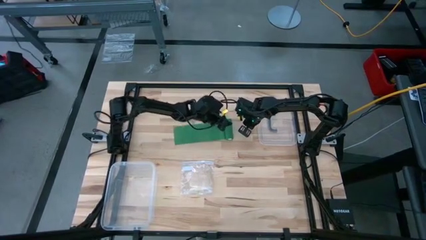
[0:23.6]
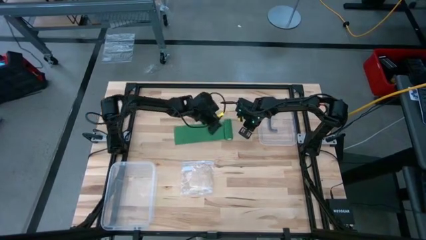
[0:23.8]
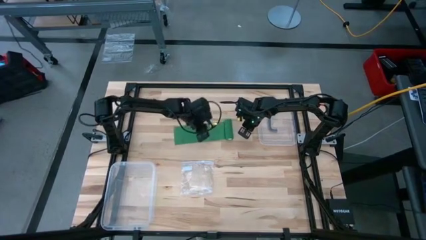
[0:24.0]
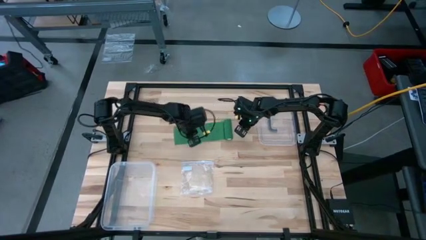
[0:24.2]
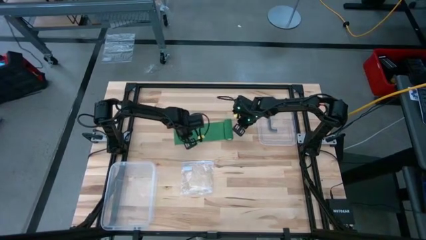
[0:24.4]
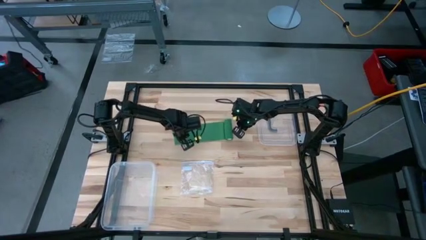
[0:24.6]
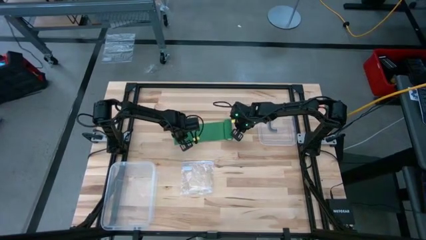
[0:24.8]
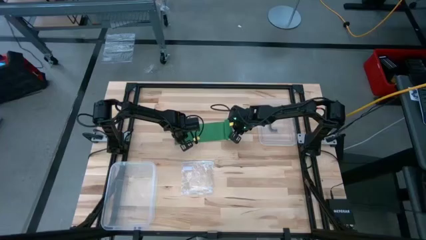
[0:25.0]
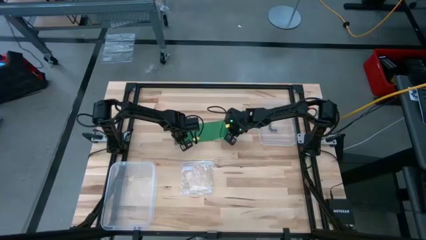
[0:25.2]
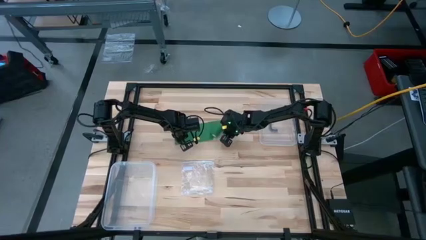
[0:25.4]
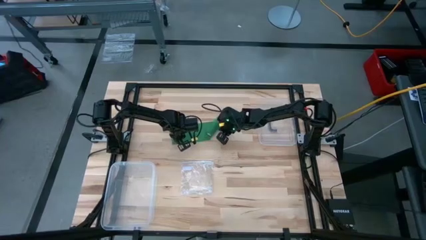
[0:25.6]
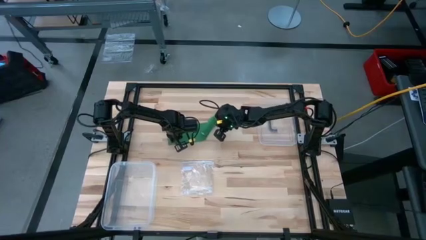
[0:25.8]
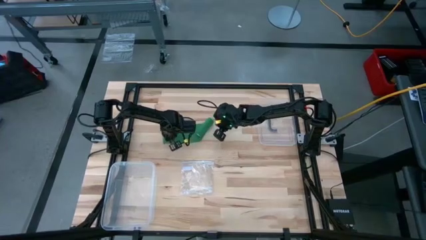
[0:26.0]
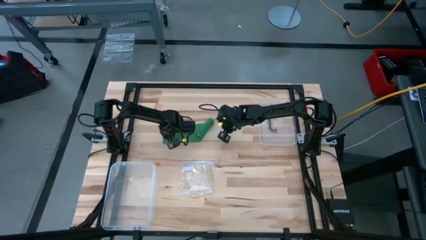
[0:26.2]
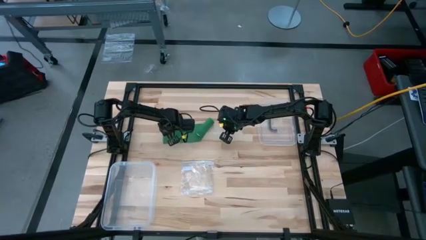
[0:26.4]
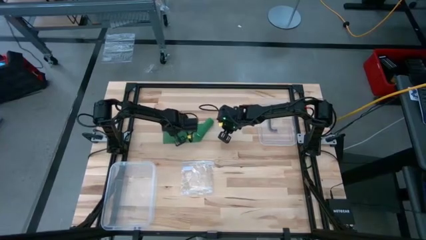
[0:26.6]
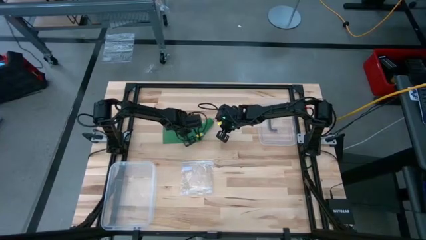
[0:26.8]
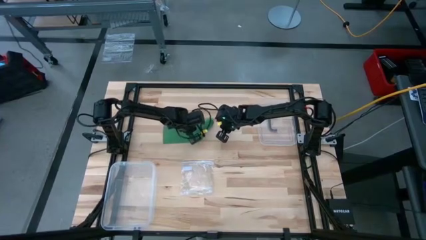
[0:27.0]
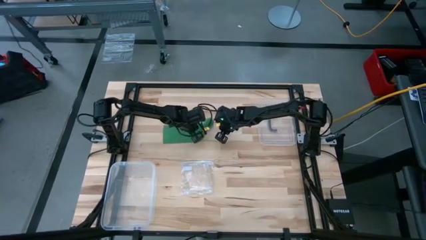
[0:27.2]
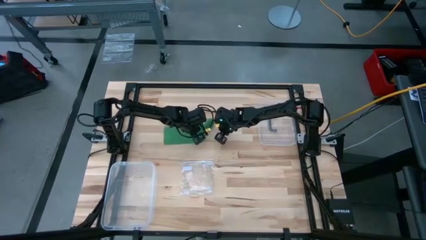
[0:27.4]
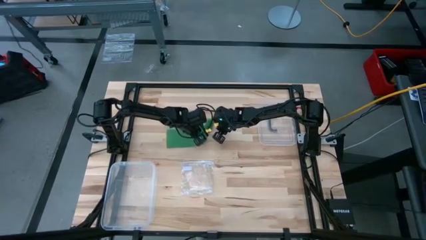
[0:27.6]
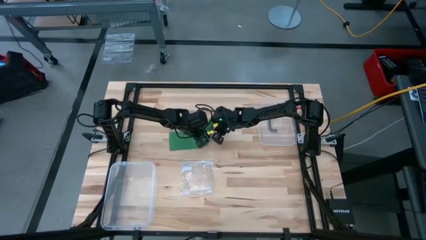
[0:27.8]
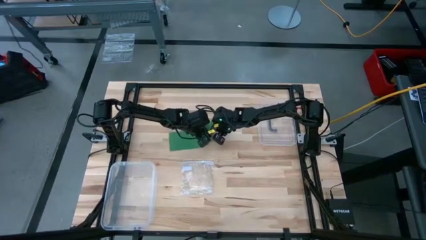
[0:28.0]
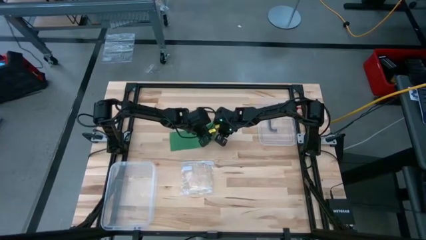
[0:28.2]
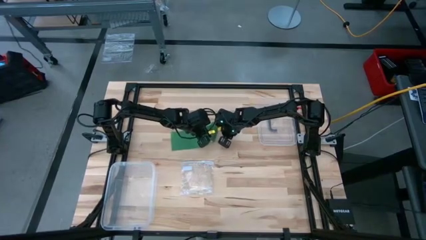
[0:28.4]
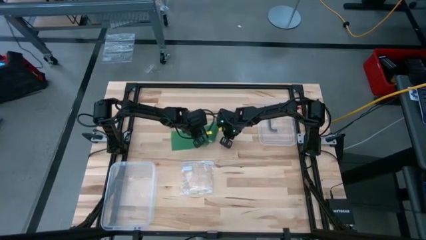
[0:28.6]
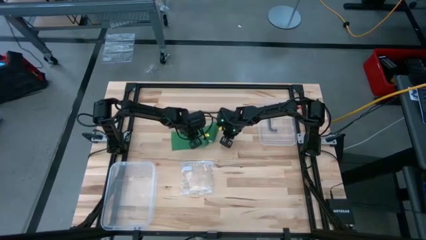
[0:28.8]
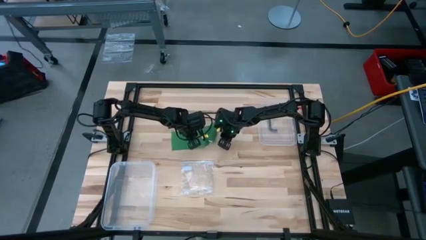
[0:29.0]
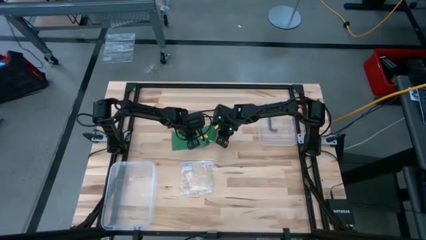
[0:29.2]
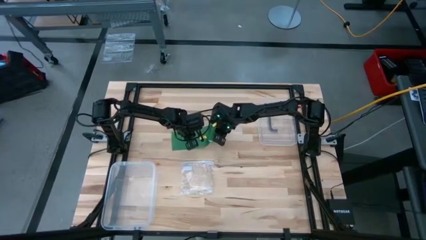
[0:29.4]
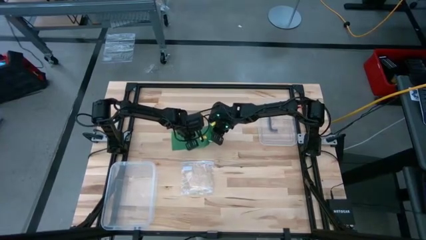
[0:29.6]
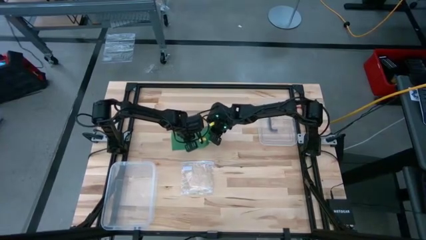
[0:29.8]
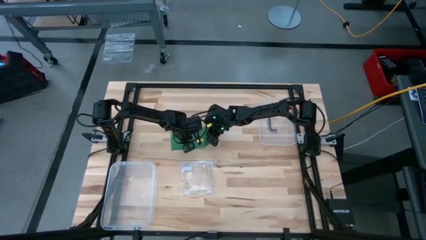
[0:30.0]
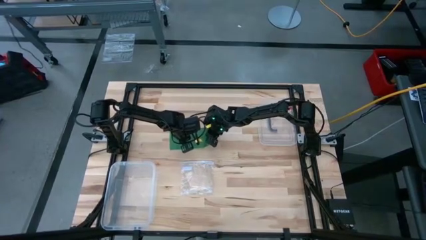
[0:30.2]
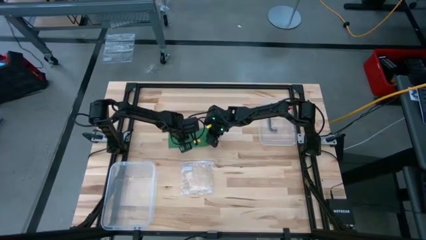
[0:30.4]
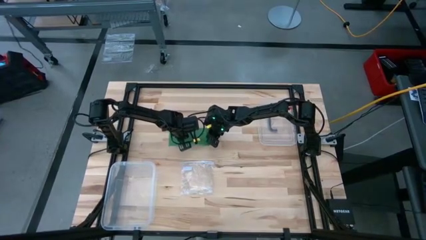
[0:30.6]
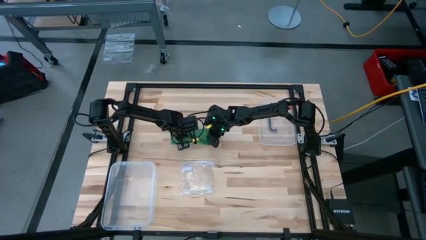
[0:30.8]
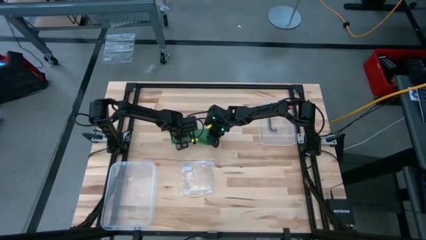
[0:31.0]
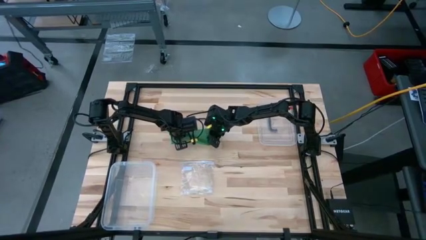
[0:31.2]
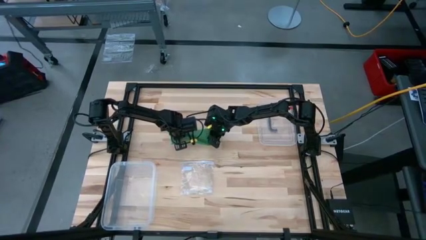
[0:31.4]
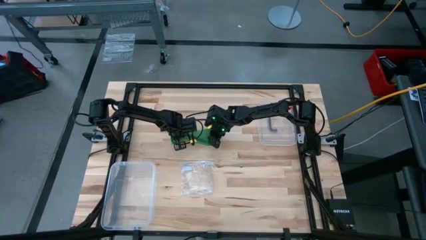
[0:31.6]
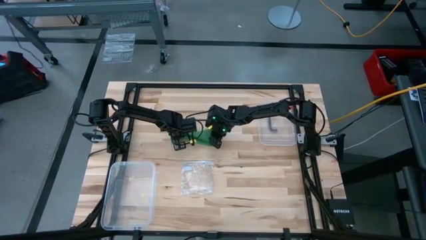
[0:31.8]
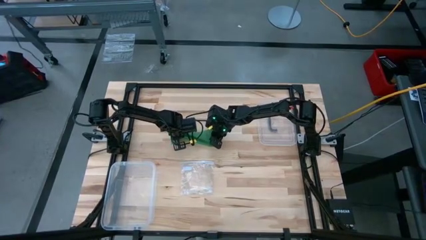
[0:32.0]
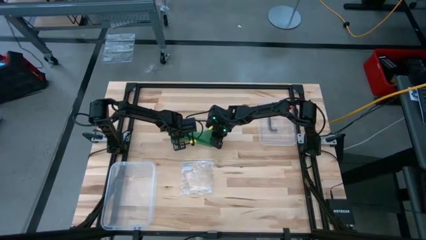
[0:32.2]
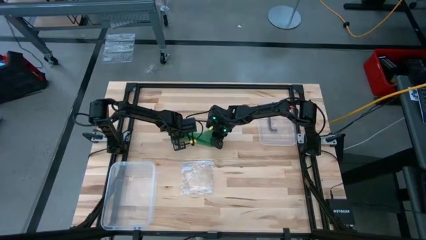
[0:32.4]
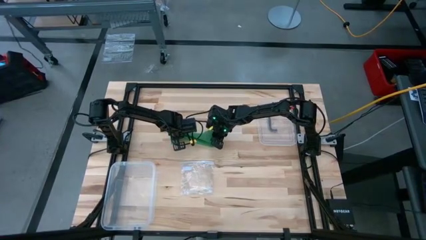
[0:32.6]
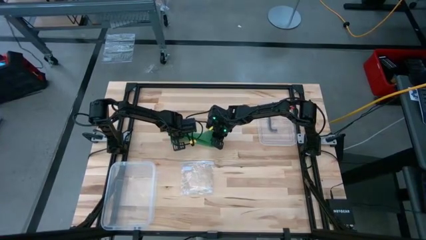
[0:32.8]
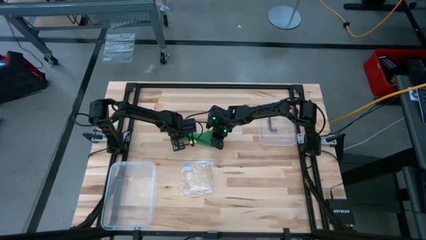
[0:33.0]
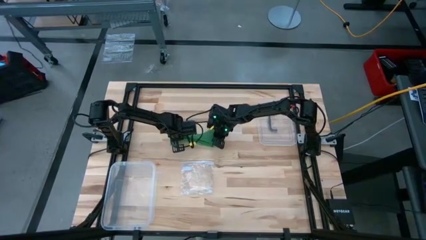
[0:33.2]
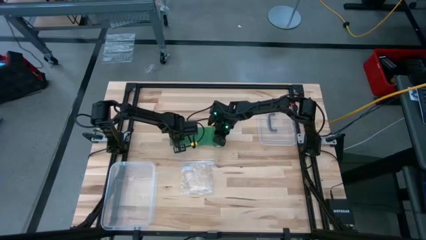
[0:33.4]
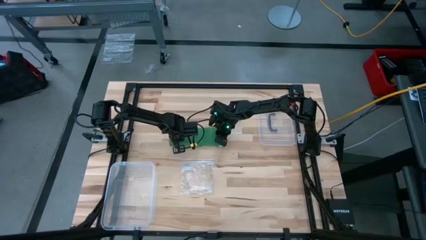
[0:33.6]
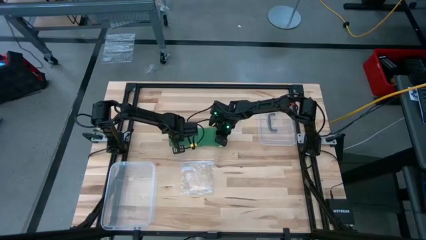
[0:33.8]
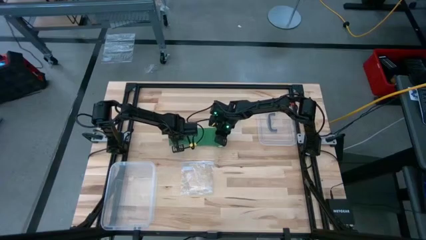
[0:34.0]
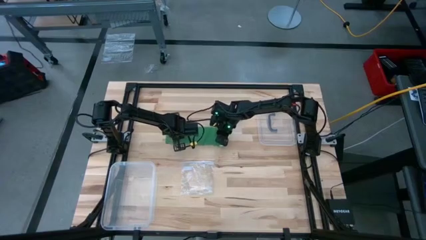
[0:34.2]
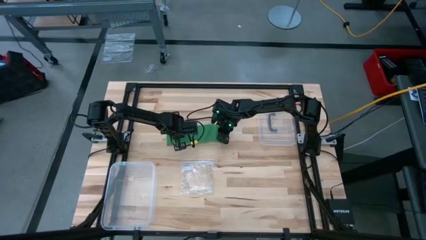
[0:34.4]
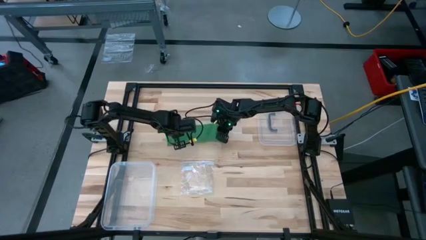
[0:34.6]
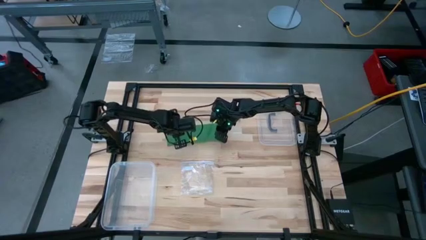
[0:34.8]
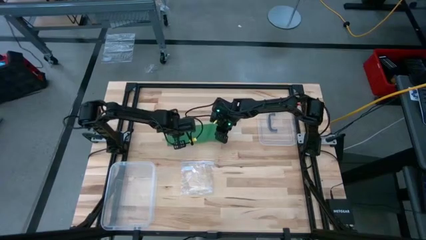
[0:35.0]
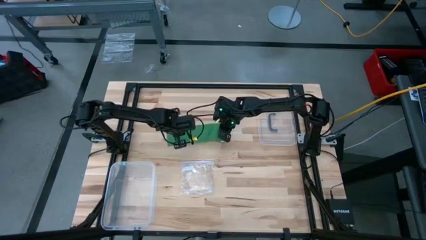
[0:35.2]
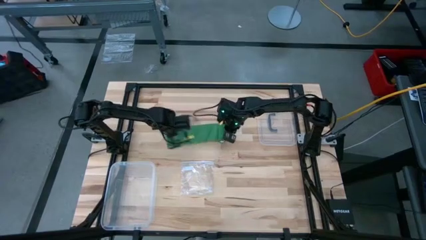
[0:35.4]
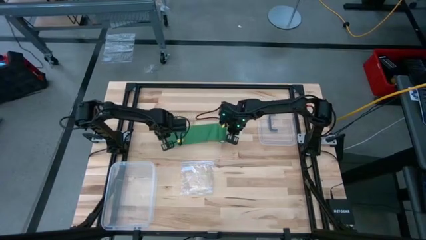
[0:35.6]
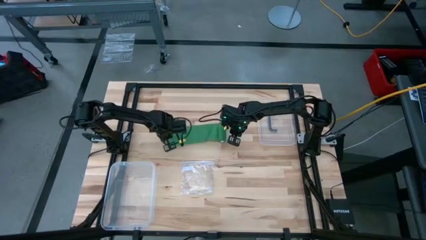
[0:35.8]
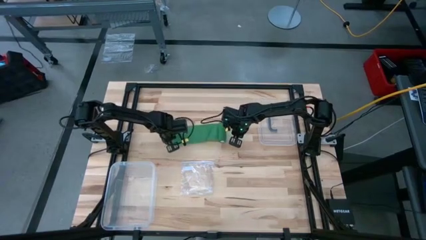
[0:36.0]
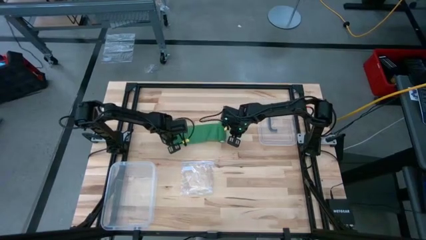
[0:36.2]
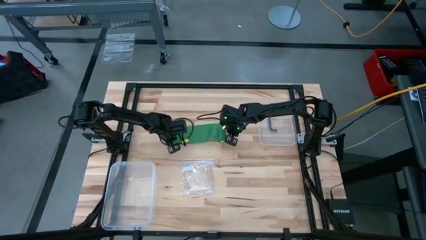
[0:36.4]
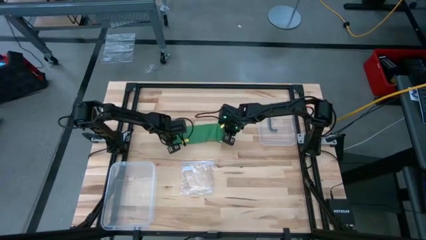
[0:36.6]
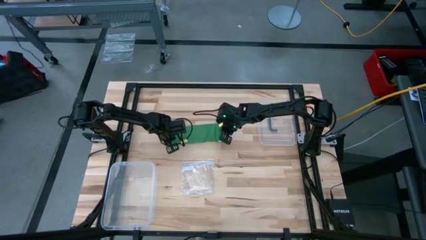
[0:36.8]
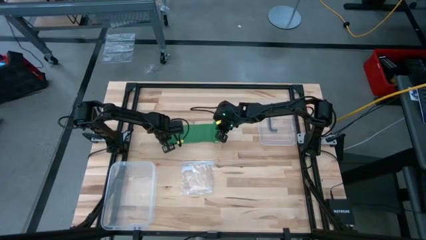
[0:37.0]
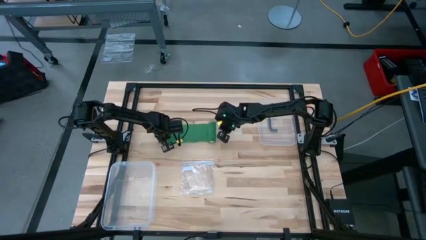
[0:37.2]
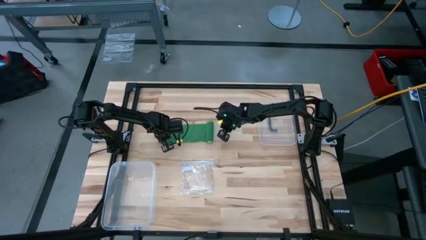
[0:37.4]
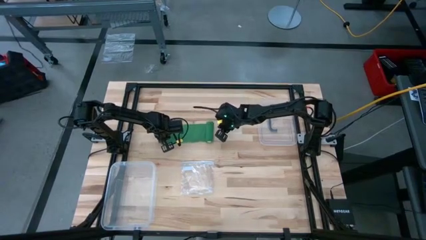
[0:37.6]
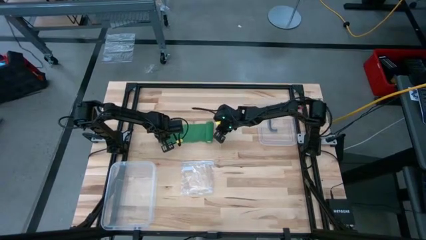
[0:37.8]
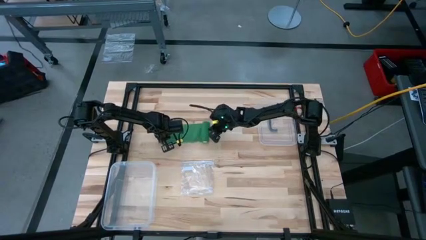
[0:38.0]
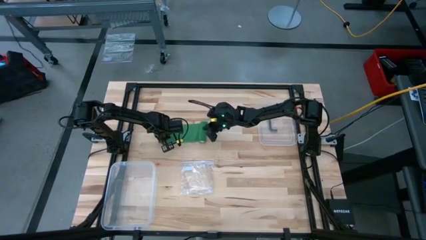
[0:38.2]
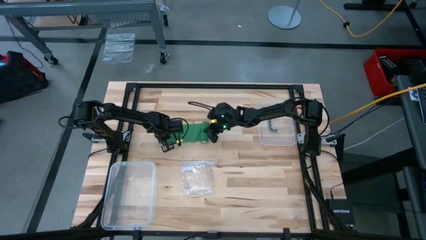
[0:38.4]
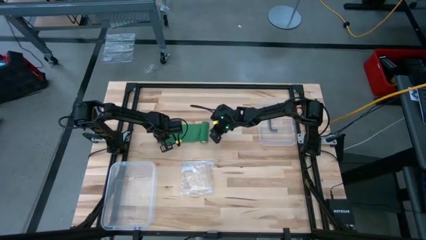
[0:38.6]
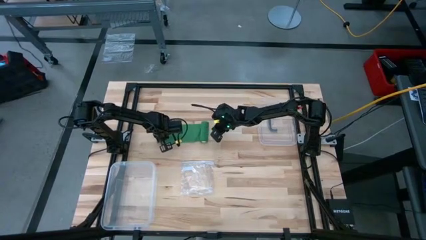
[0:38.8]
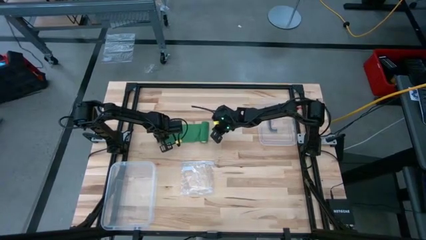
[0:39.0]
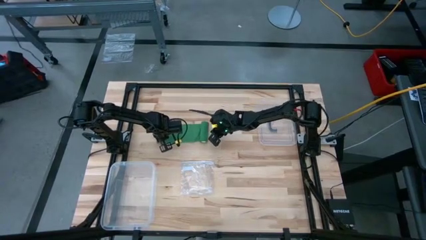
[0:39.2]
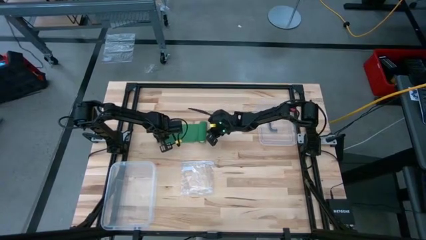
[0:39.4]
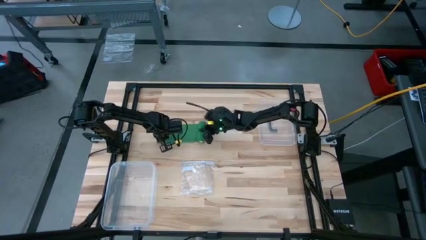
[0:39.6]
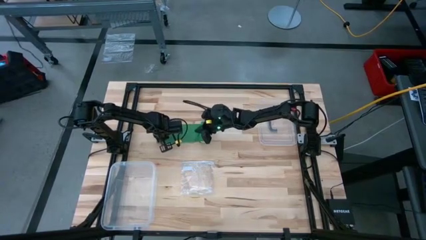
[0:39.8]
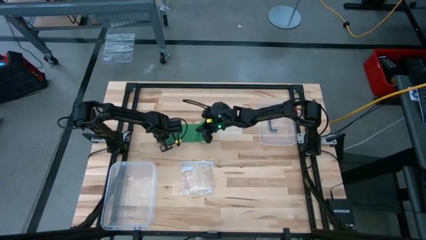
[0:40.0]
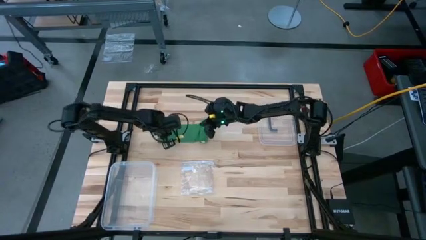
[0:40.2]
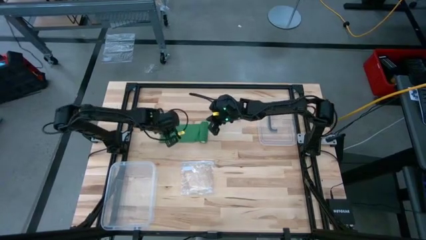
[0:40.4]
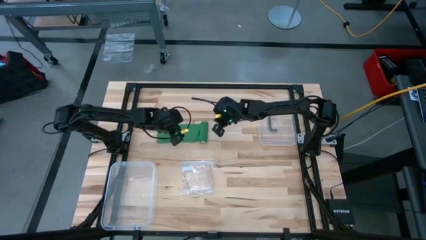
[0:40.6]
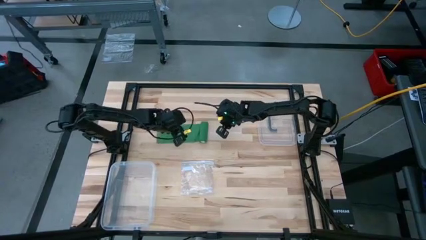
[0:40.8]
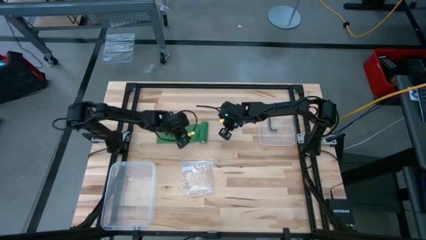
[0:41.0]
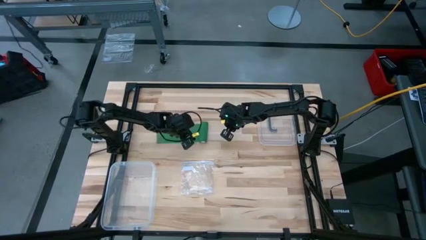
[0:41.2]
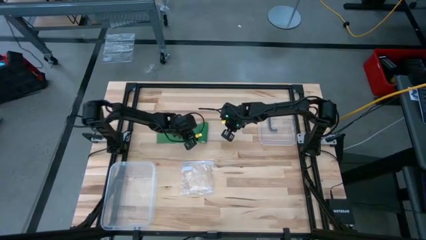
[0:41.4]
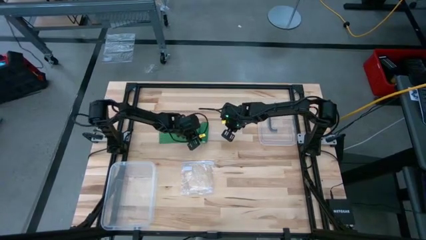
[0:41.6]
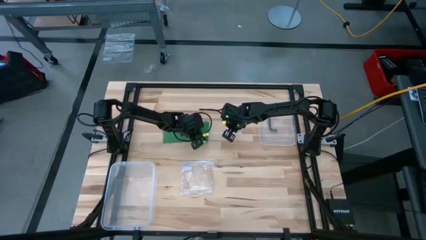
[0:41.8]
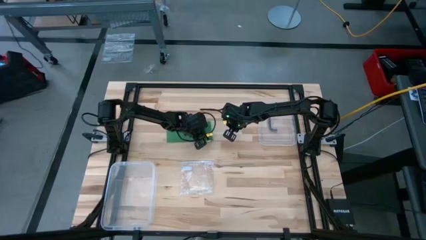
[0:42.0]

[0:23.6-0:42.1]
Task: Roll bandage
Roll the bandage
